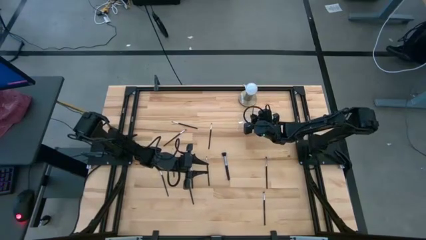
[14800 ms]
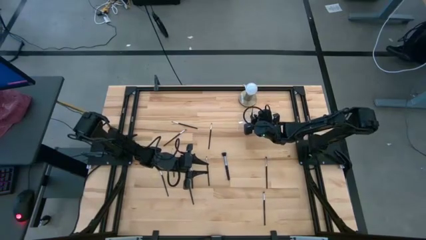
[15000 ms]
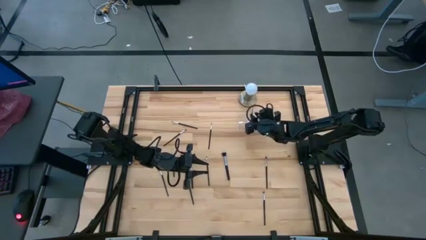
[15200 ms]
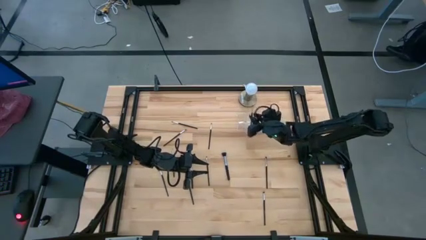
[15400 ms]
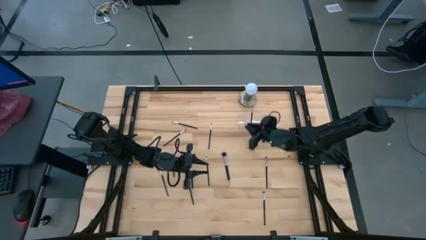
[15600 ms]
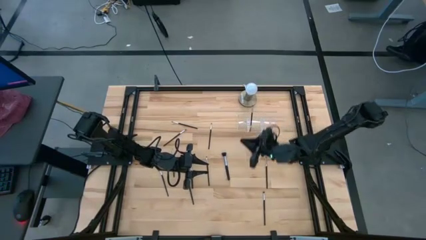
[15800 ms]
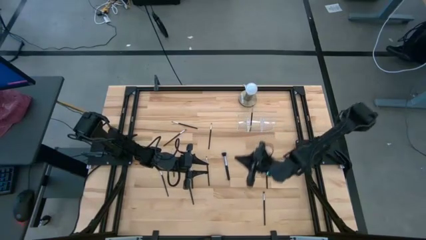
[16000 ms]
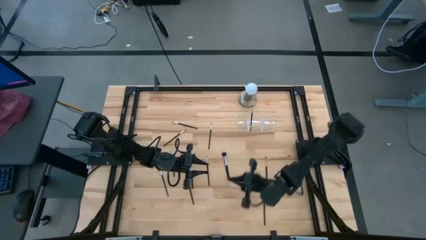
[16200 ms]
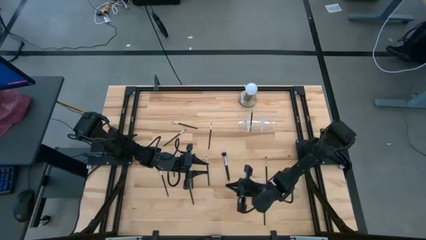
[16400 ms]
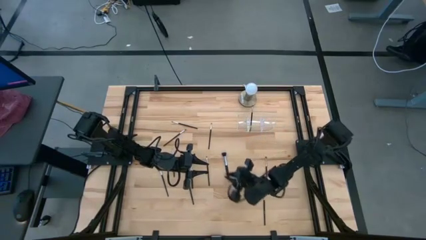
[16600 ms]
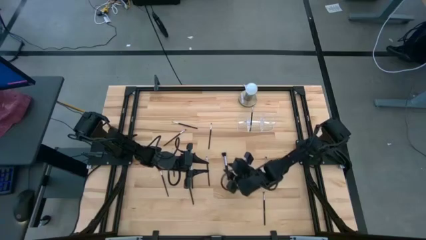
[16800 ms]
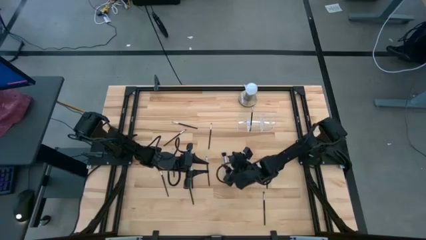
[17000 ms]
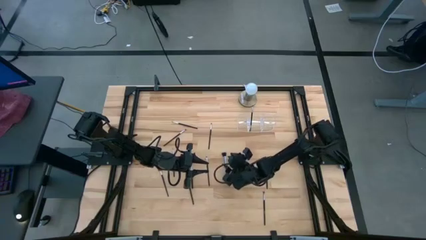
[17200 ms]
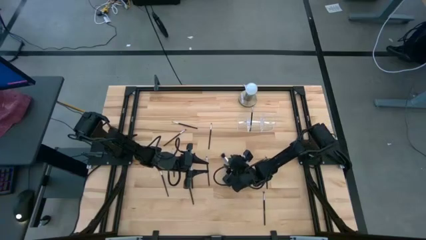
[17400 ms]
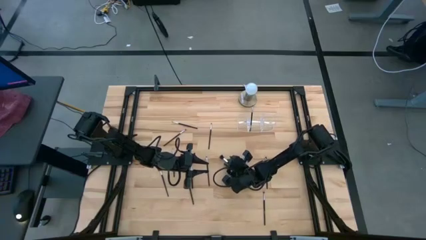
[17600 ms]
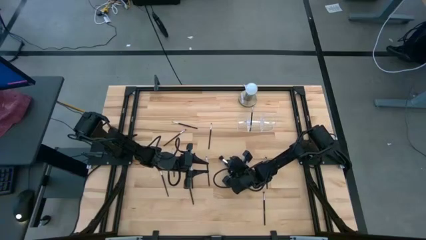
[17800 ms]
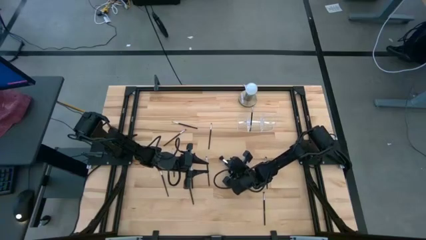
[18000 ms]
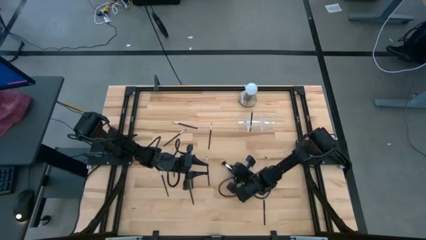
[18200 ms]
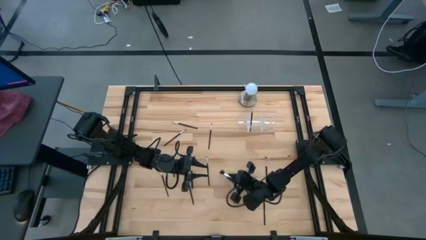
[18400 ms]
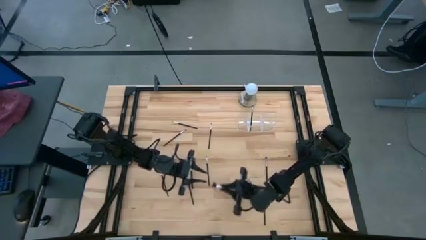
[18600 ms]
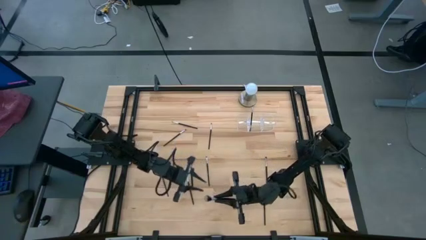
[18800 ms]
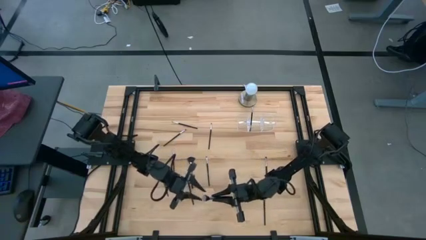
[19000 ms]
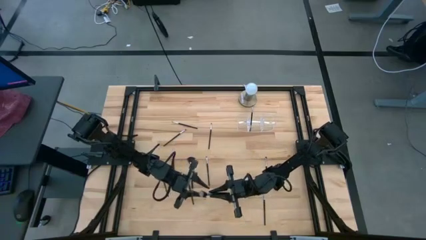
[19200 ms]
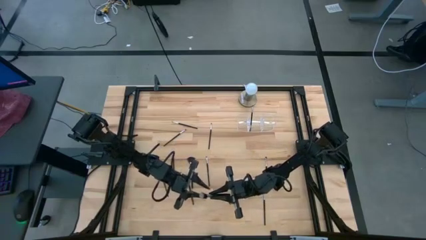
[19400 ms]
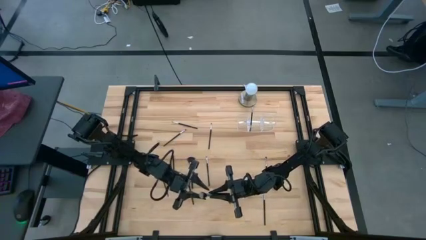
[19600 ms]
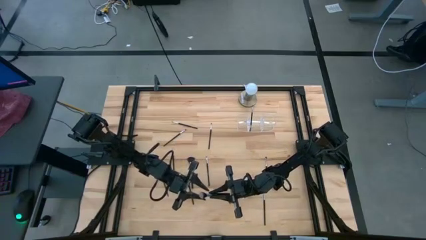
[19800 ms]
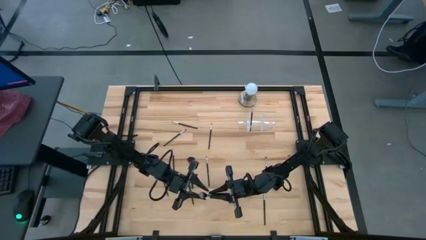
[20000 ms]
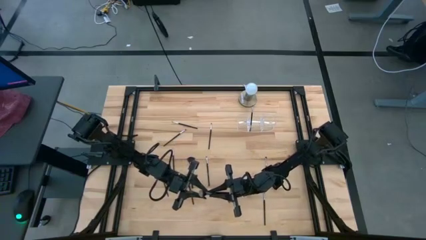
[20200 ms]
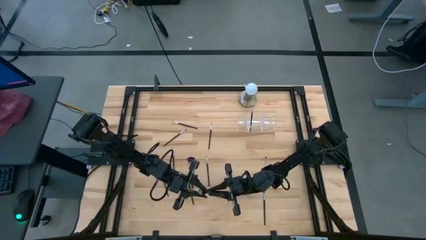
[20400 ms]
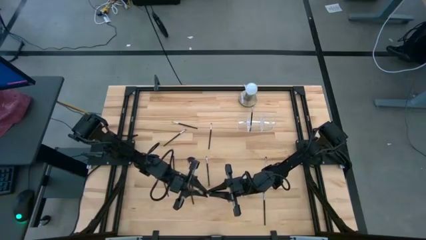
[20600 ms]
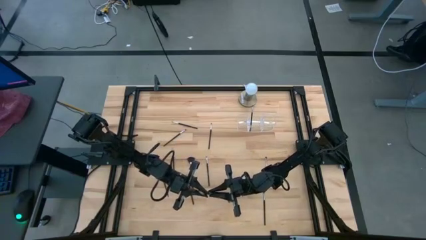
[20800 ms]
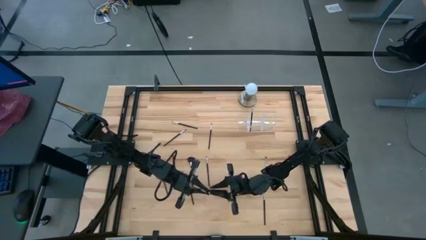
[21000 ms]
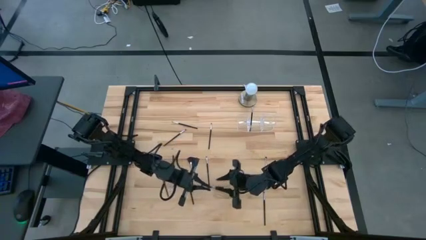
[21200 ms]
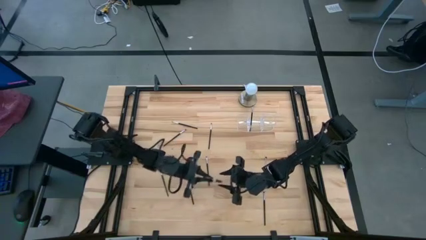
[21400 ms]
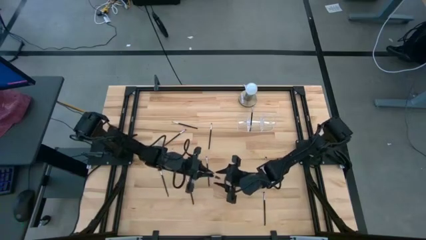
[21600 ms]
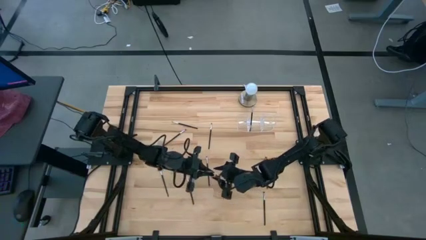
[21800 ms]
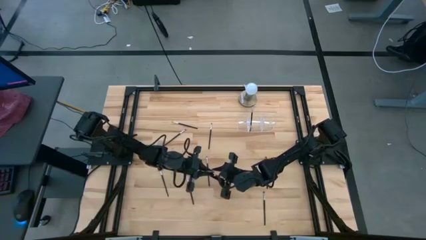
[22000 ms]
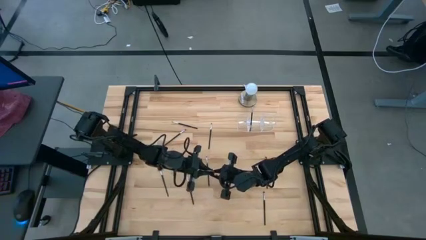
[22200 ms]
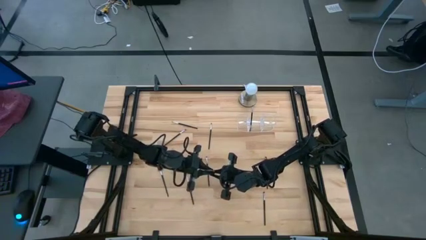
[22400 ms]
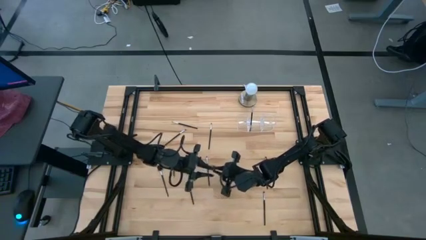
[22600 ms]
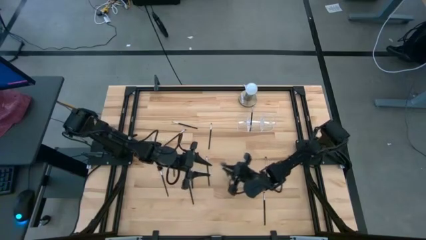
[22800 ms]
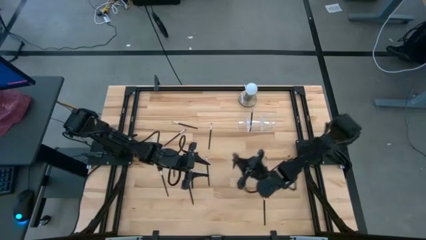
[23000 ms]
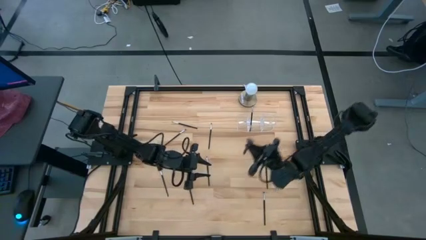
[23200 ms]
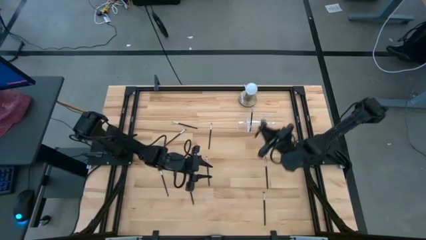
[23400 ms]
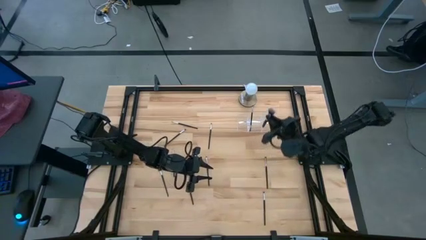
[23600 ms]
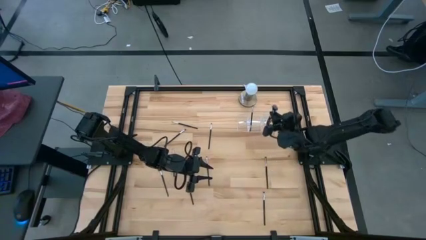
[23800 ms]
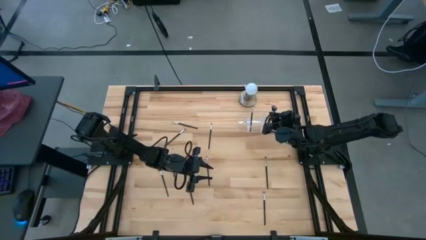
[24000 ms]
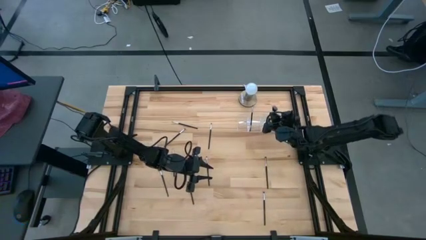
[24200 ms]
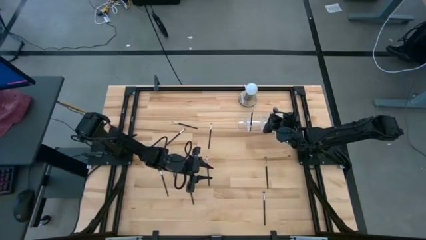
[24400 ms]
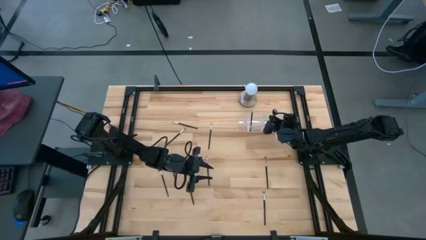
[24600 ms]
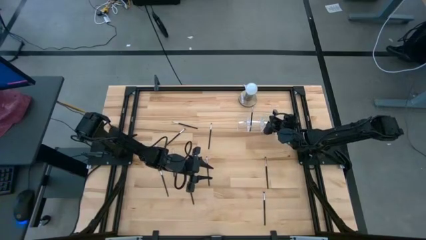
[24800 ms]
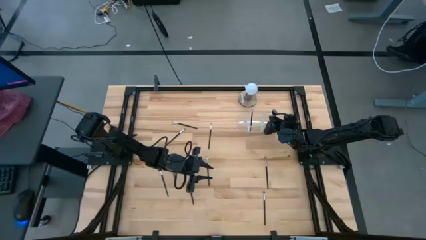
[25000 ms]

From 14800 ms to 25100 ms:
Task: Put items in baskets/containers
Put the powder brush into the transparent organizer

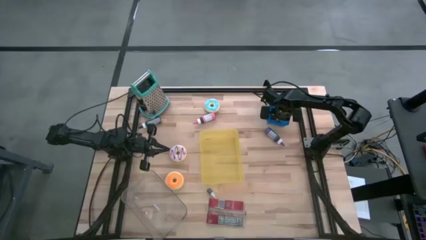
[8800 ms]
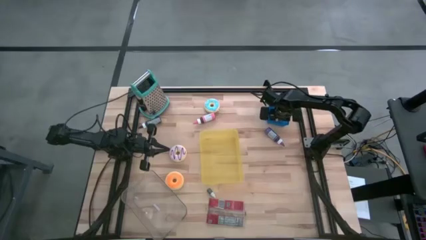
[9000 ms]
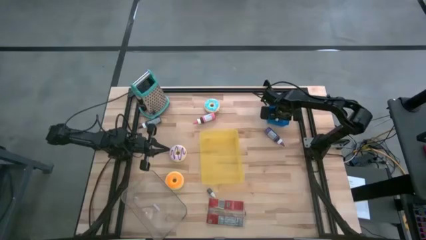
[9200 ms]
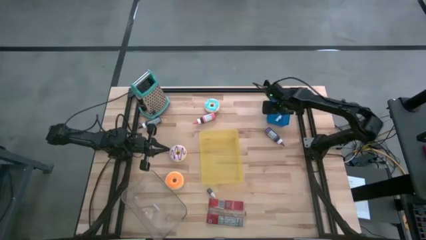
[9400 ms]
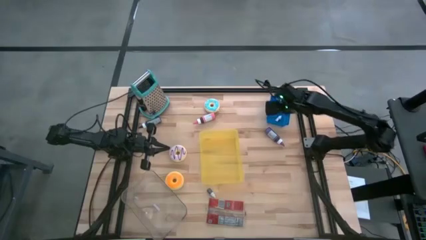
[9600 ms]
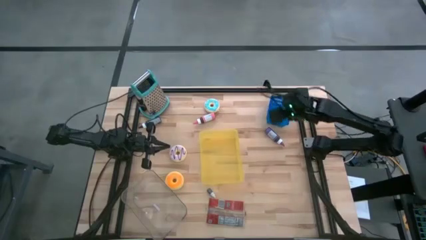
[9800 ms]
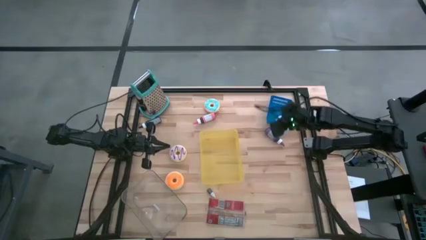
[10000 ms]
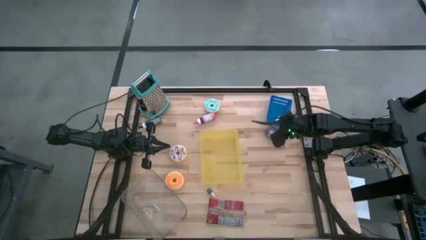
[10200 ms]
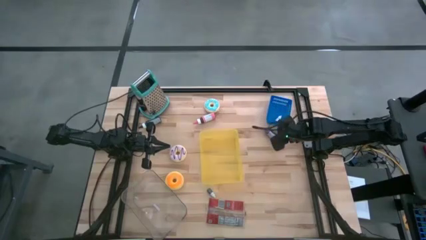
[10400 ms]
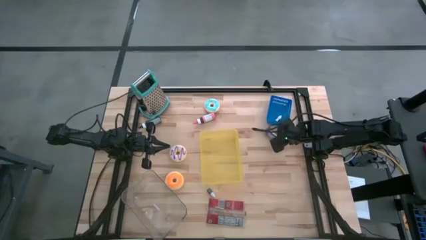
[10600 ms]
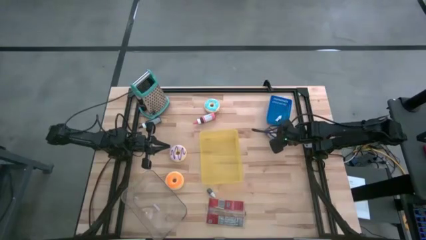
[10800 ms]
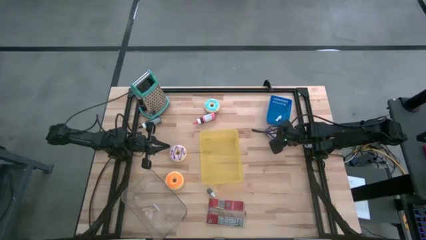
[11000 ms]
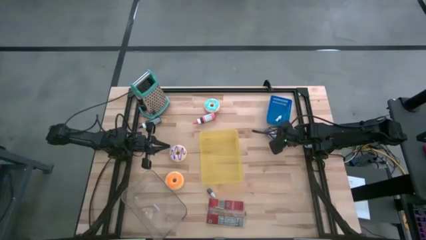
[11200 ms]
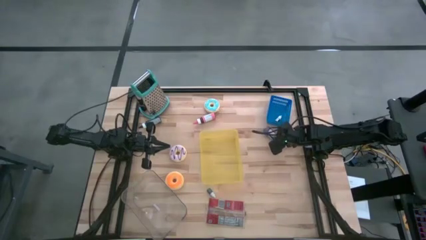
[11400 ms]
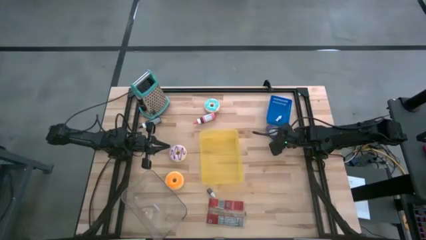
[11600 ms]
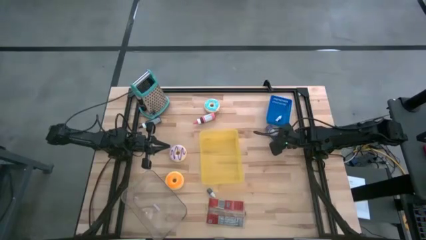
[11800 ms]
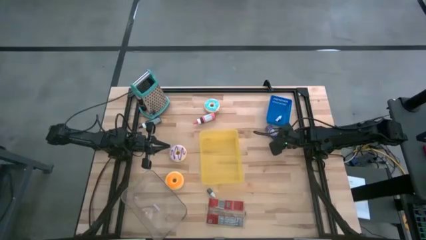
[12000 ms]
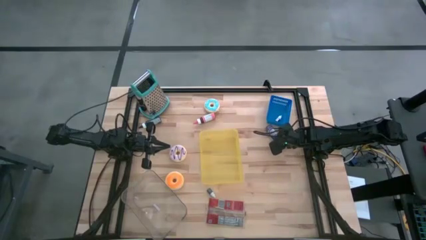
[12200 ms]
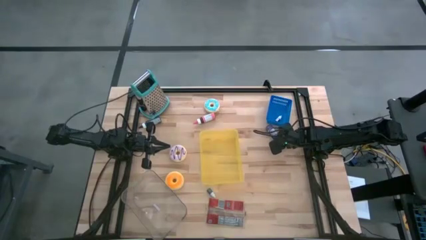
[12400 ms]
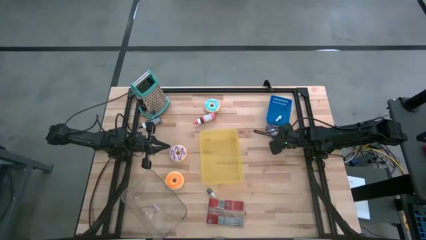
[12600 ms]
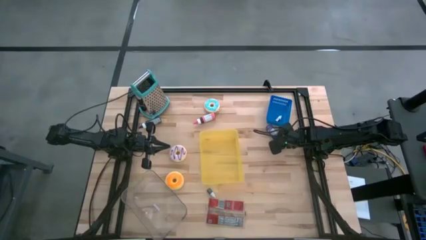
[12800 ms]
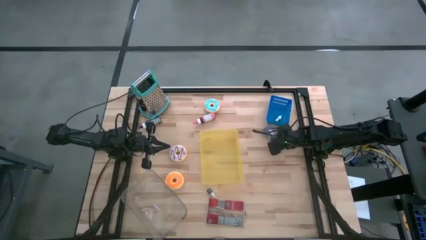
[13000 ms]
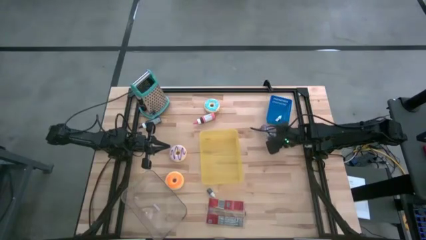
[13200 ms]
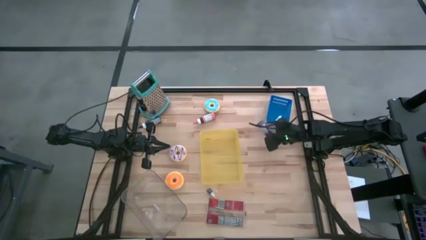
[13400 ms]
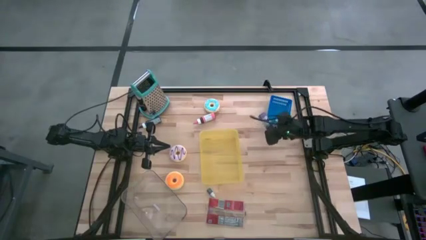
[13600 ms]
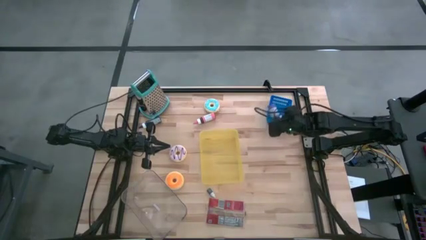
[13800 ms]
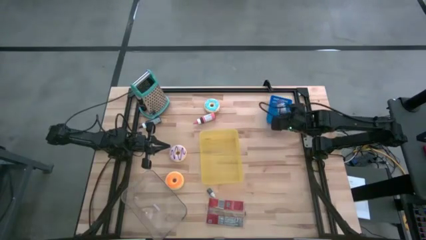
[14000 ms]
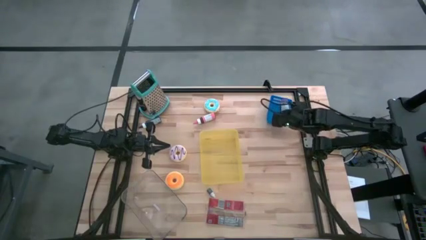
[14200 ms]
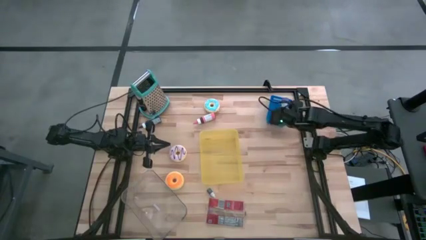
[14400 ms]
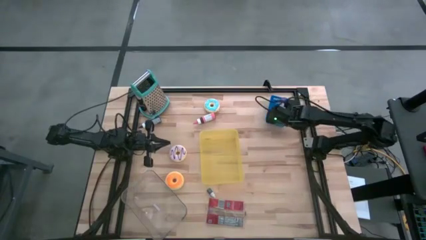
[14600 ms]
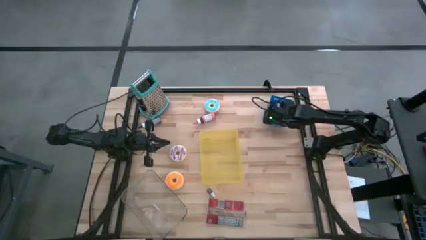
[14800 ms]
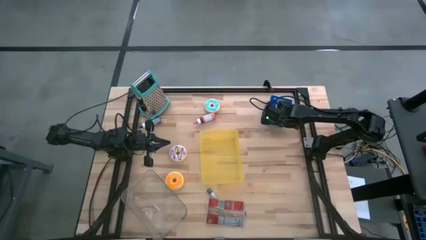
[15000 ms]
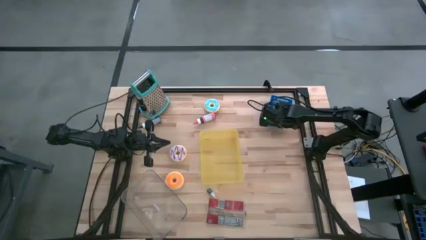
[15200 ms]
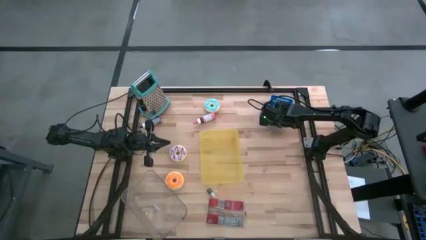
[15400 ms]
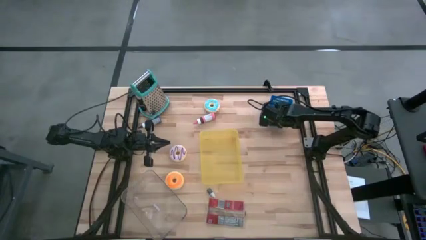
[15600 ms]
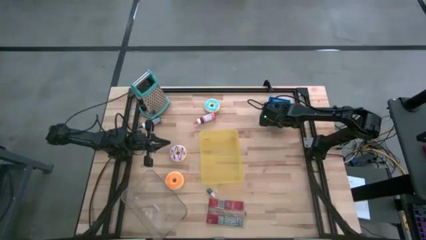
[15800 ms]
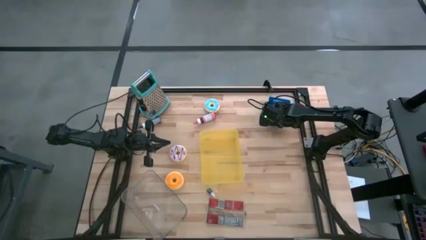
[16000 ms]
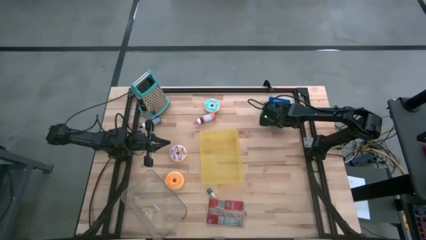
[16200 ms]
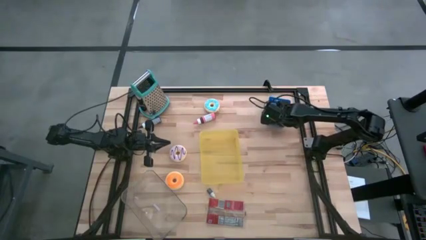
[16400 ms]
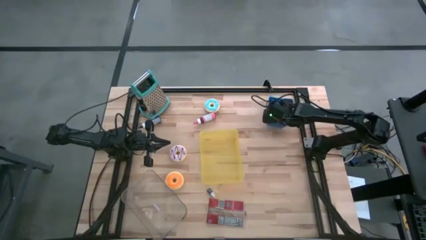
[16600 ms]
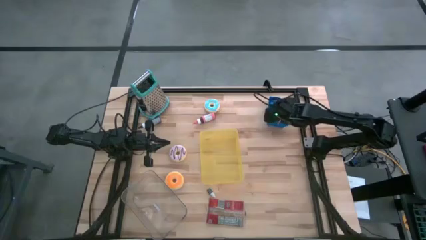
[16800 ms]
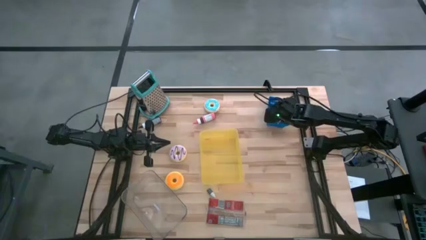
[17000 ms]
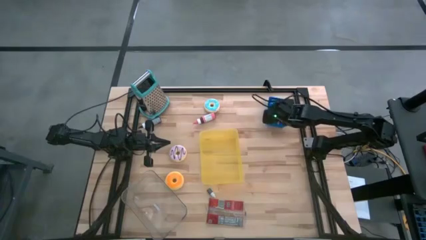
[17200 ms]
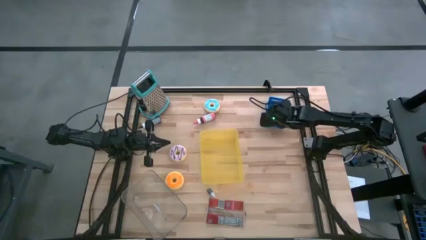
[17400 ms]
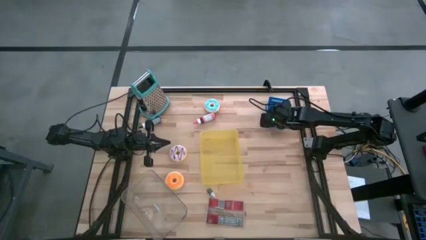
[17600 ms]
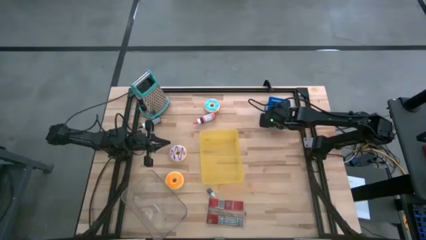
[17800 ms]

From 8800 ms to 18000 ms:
Task: Pick & Place Food Item
Put the large purple food coloring bottle into the blue bin
